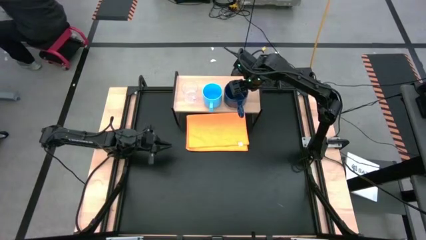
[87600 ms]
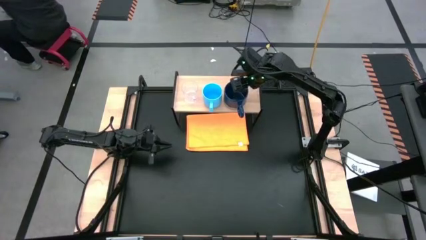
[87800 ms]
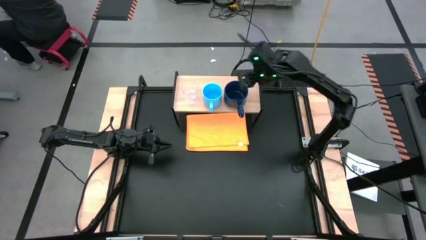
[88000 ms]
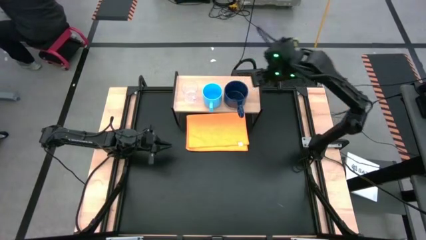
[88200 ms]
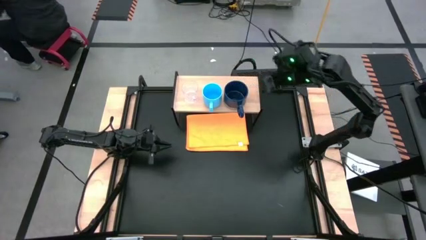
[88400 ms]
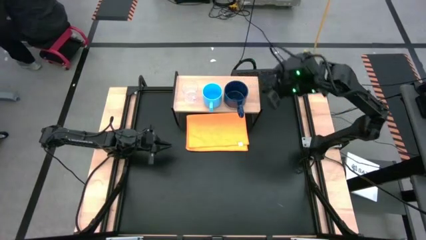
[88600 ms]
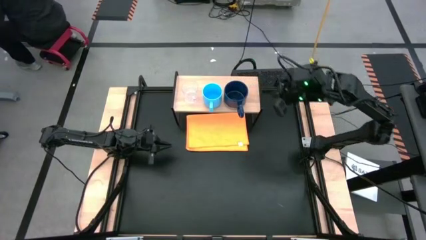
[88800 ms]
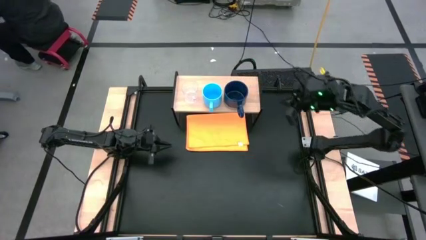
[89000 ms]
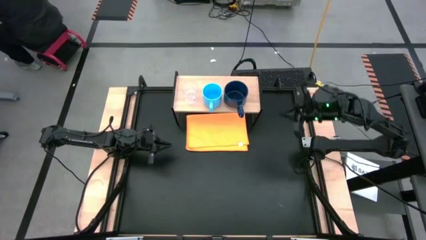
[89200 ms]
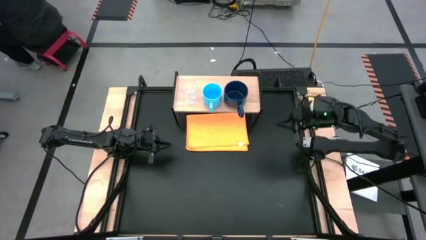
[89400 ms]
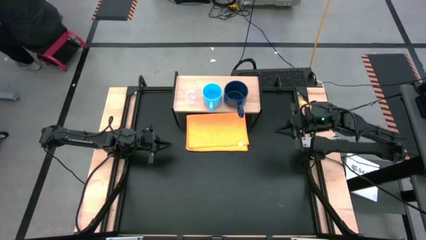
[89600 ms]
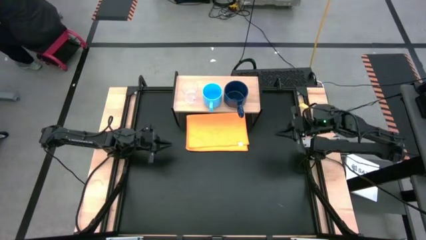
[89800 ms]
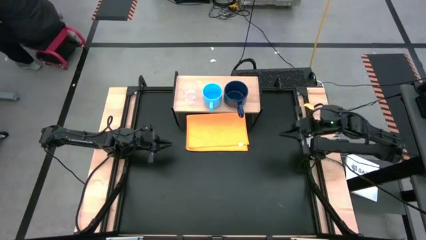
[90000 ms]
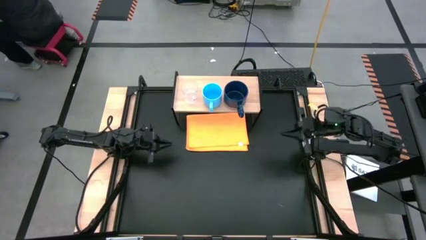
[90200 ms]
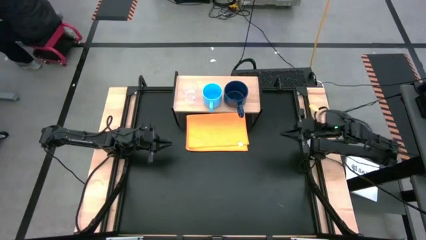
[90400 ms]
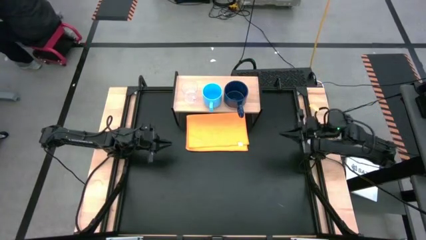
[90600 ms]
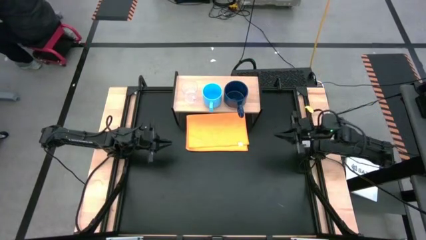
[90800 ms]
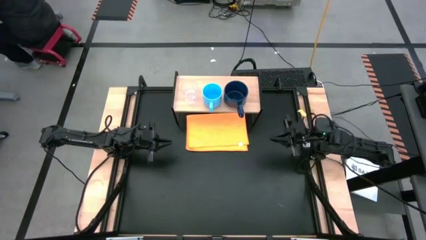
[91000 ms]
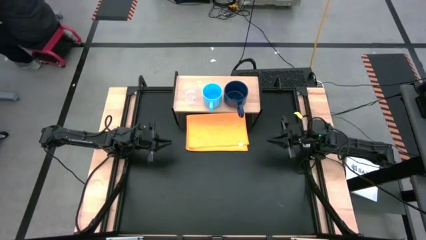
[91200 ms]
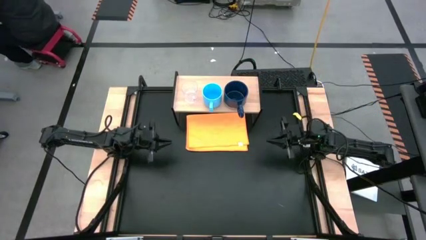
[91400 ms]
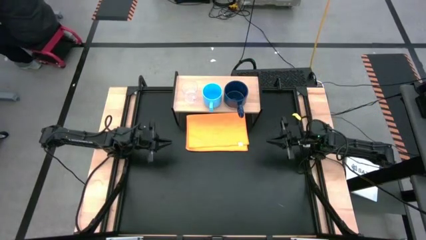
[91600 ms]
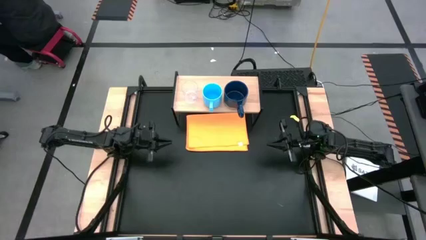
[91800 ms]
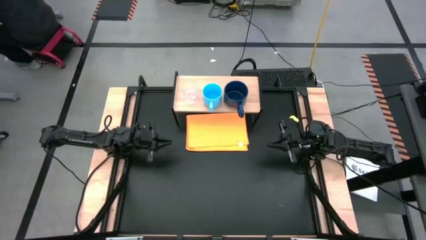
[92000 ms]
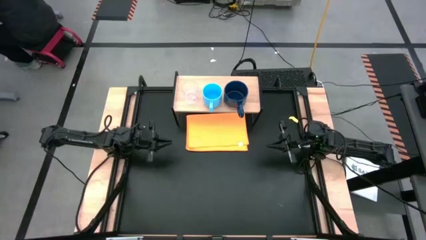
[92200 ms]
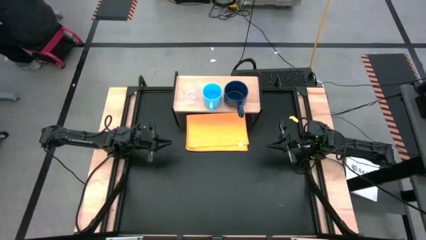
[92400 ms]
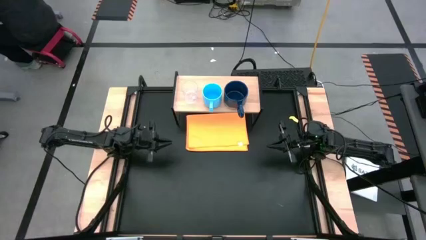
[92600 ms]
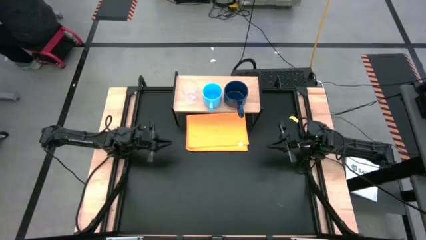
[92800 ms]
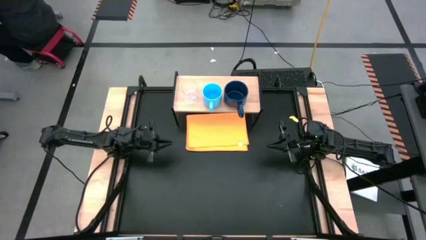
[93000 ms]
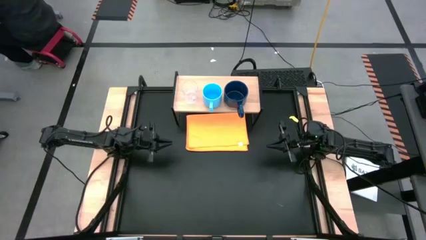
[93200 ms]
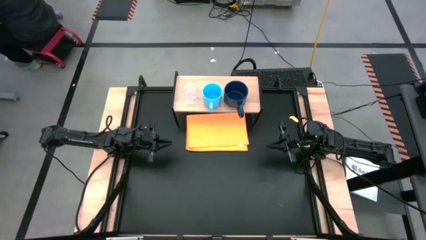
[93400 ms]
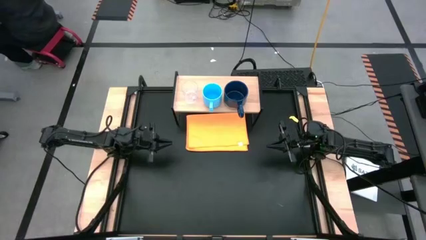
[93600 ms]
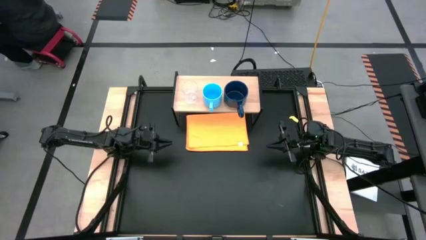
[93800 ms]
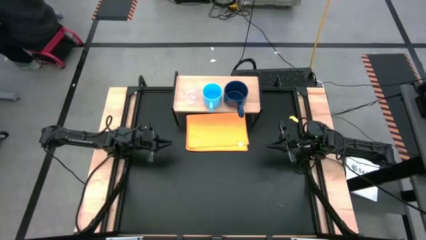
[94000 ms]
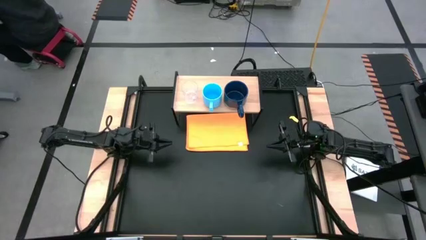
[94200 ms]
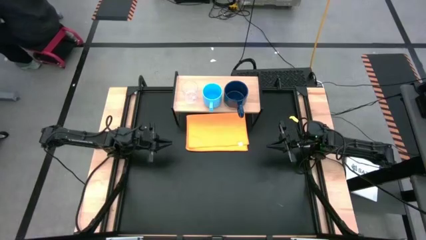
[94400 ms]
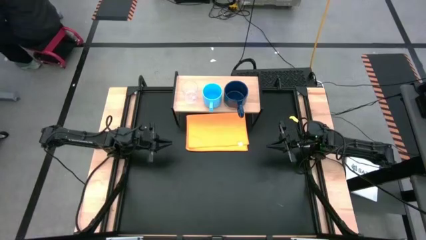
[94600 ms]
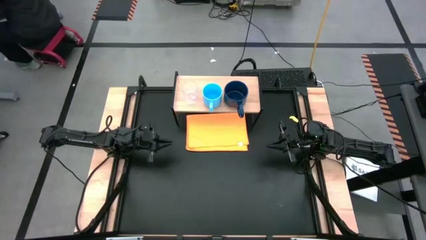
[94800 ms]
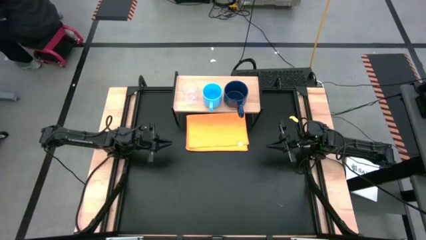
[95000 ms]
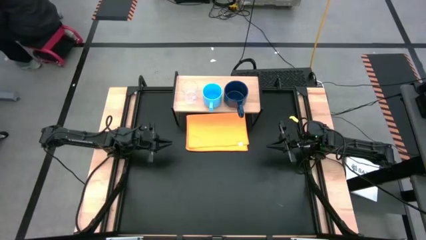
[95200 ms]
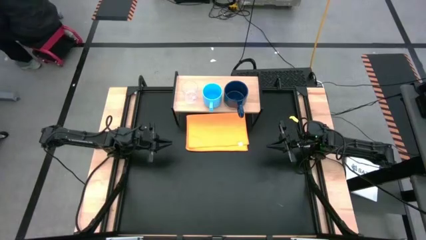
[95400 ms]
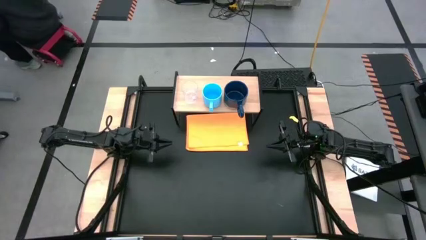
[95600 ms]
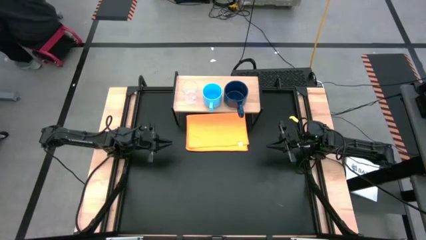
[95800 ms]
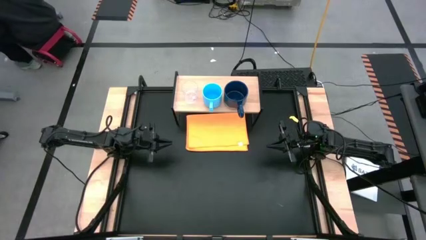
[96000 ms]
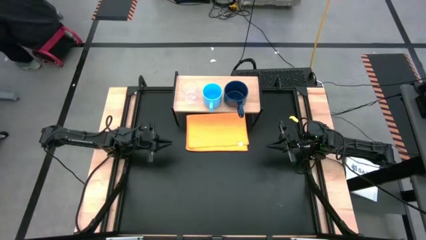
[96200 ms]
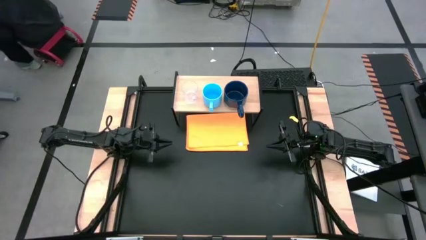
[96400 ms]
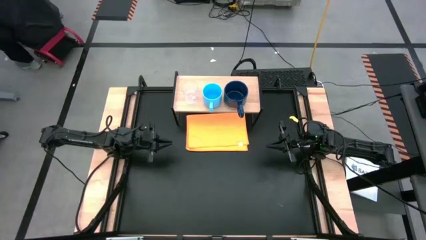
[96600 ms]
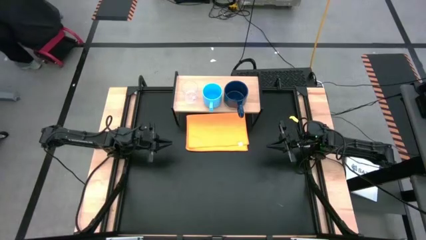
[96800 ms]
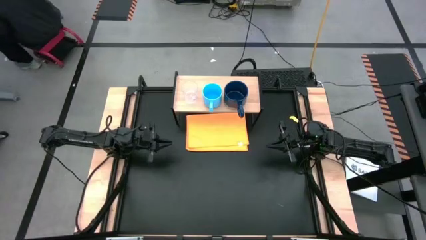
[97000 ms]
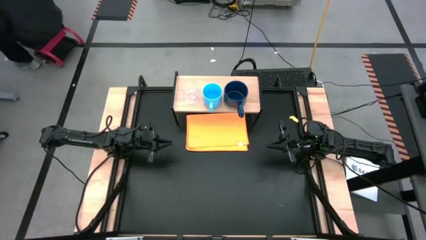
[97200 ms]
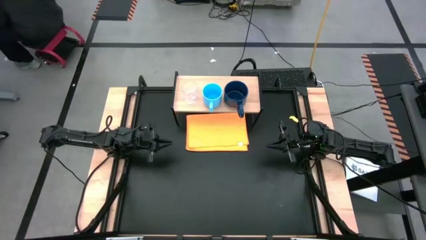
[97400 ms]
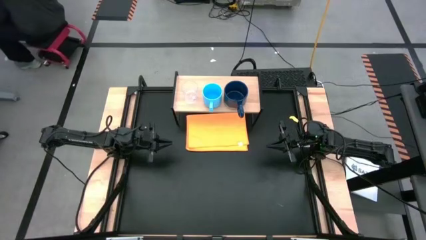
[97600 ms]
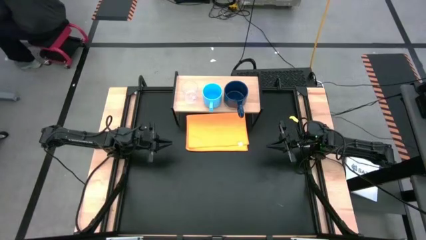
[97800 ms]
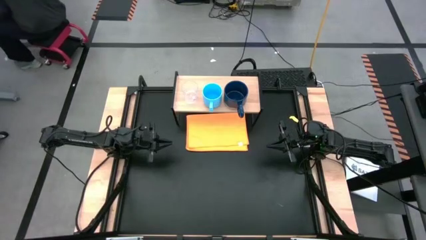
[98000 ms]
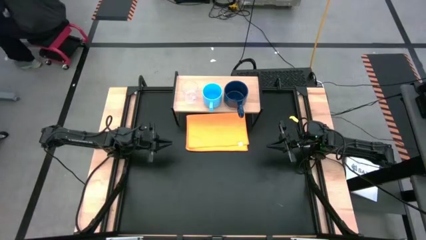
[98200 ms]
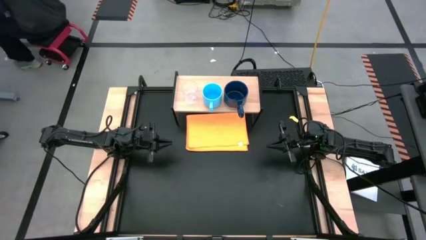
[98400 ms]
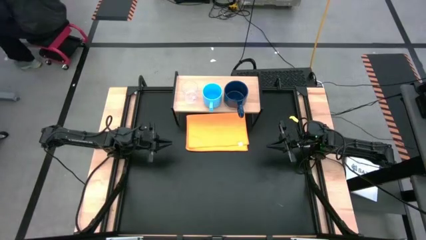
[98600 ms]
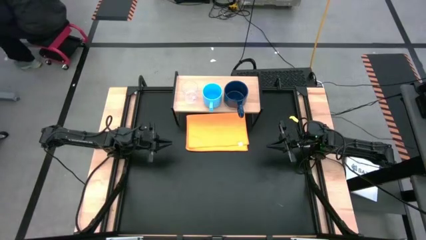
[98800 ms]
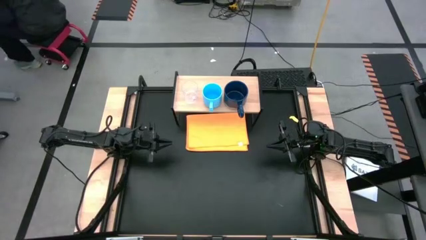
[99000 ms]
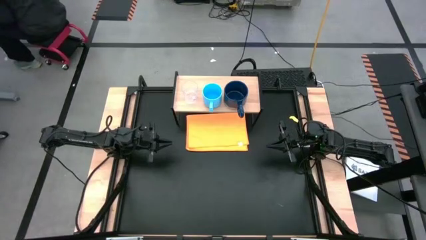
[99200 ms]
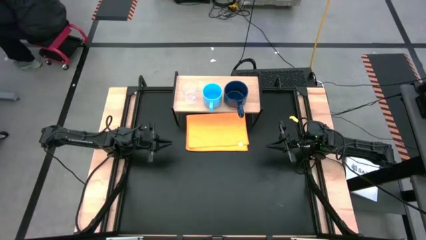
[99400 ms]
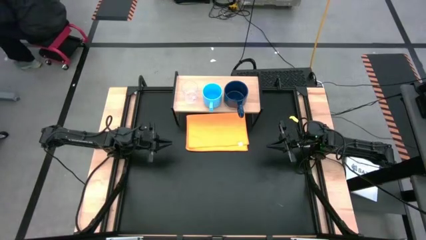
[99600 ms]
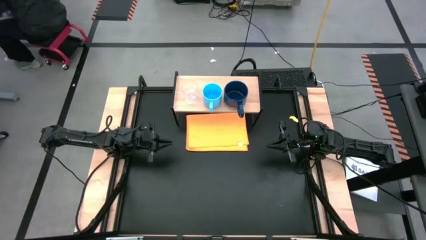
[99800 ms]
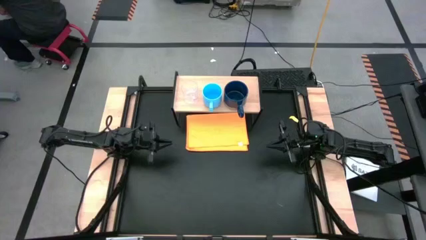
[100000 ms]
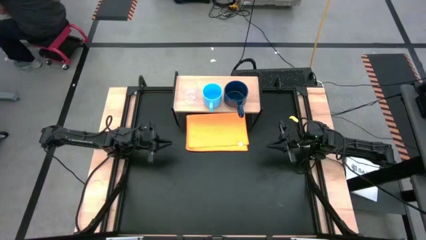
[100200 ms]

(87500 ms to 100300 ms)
Task: Stack small to large cups/mugs on shelf
Return to Home Position
